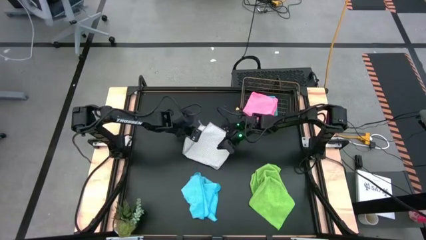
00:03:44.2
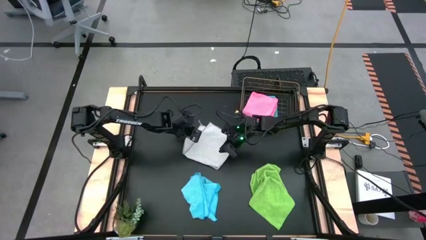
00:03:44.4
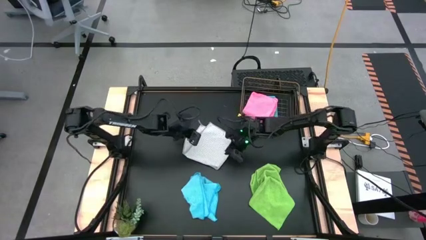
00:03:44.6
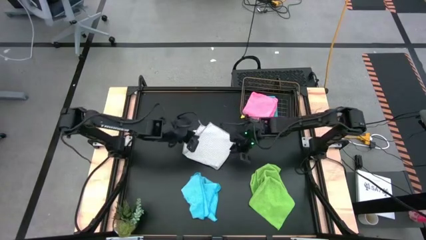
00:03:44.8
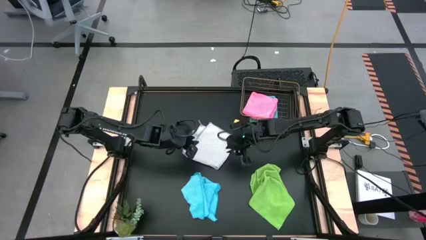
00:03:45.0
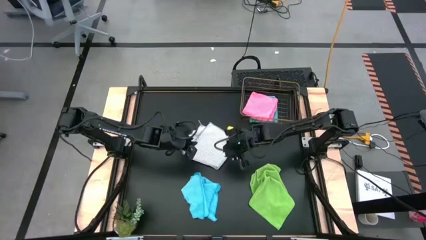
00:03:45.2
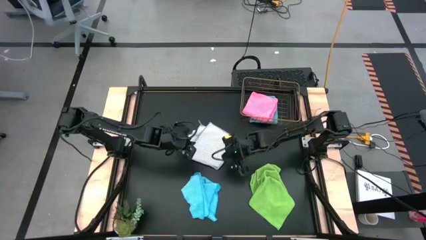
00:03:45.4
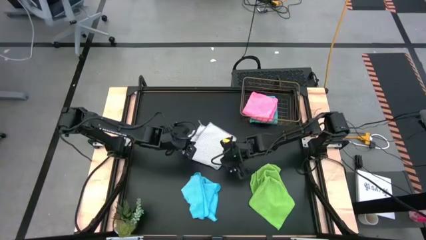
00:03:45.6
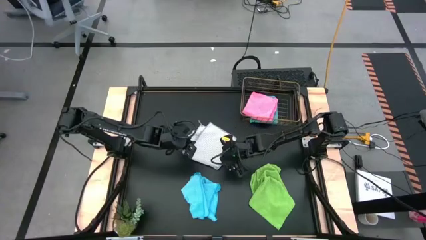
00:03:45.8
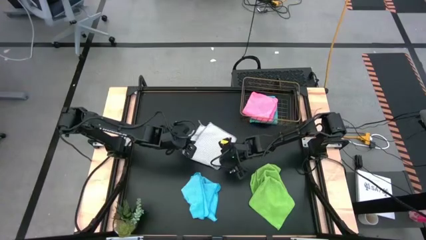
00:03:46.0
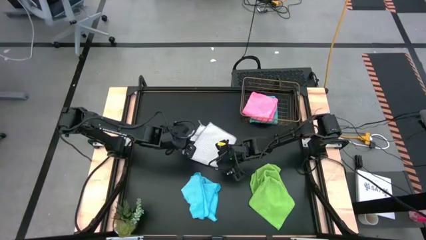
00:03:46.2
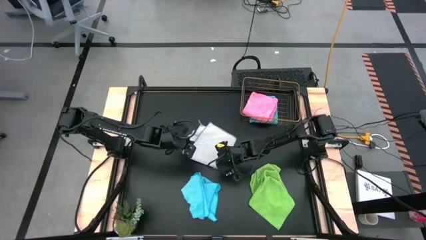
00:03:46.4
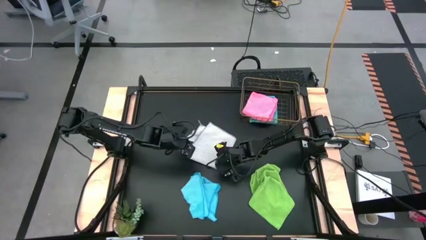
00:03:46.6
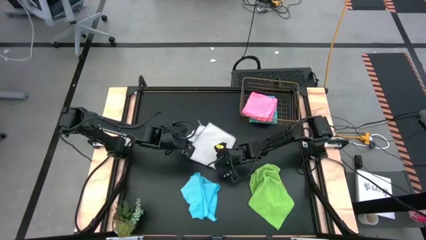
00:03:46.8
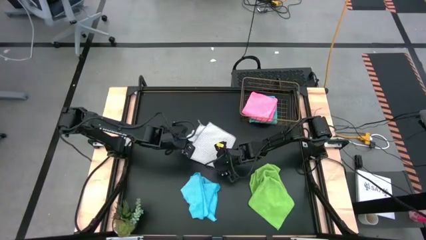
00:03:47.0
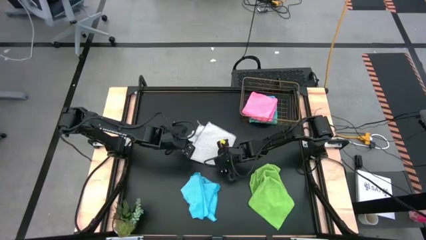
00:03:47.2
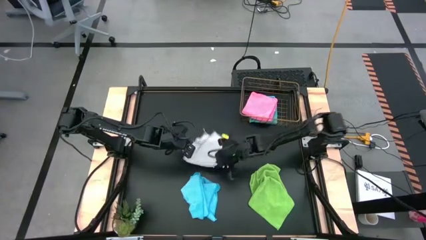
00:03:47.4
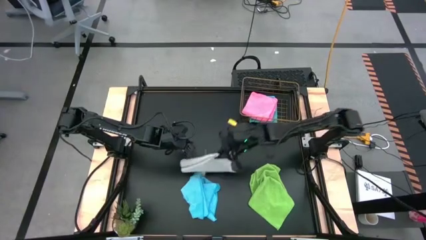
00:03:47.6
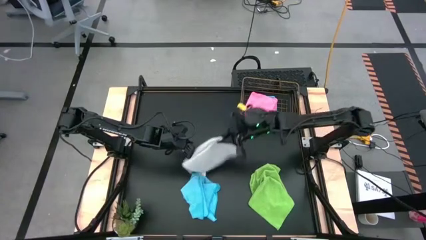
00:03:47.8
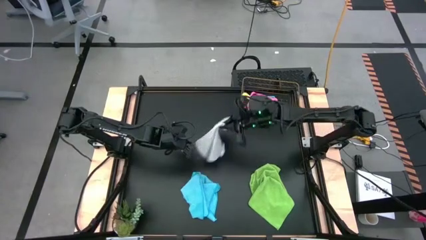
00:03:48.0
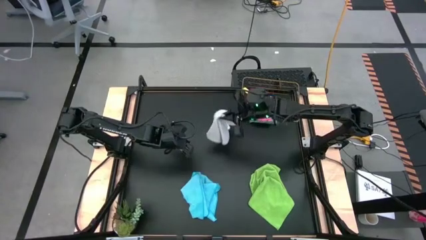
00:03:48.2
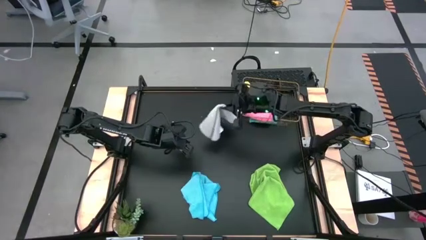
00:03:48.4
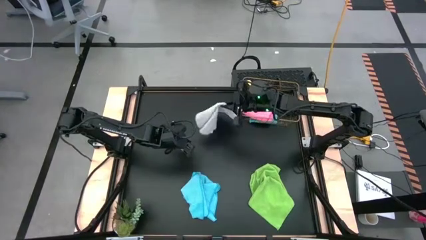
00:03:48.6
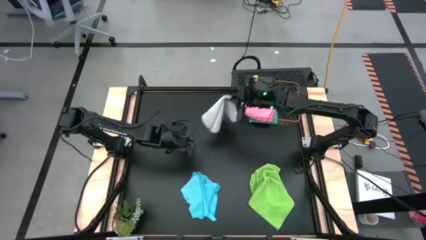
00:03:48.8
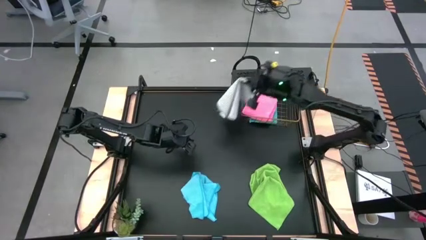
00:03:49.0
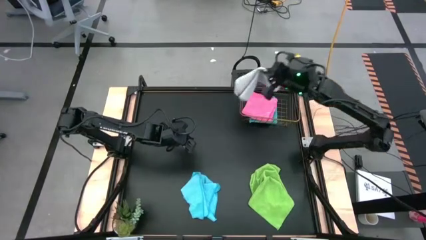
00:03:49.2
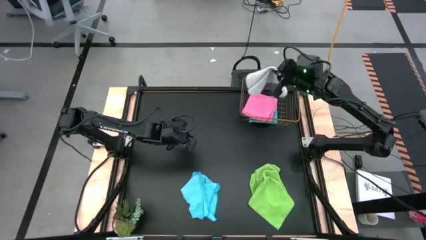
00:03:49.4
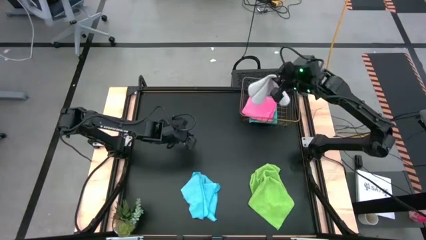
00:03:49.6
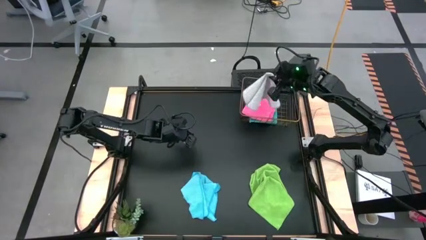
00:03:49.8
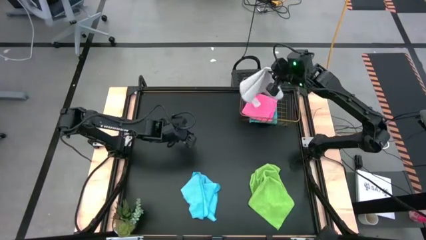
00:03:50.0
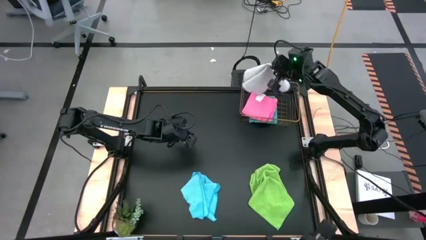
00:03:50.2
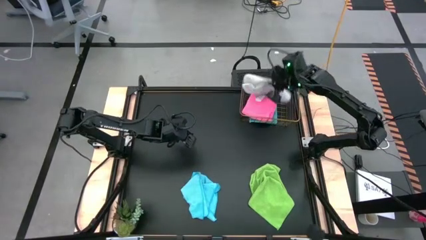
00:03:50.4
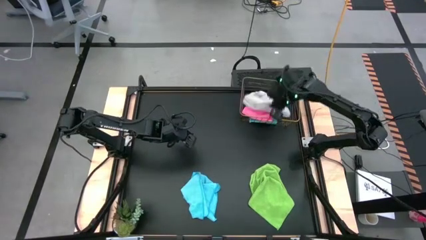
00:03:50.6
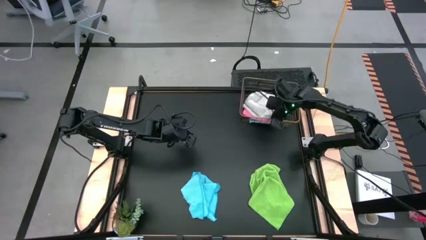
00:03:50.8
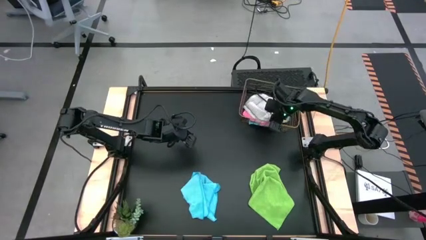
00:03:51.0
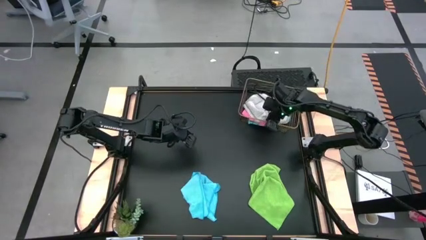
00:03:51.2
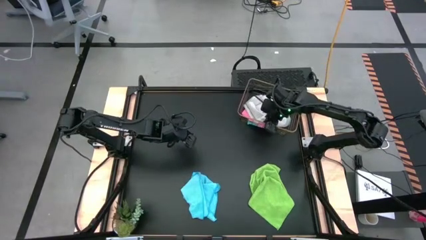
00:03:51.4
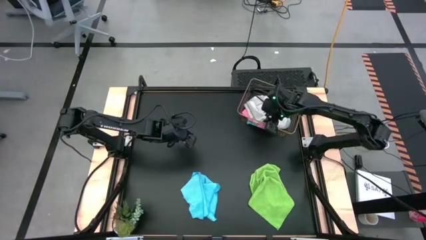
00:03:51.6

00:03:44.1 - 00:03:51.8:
Task: Fold microfiber towels
Put the folded gray towel into the gold wire basket

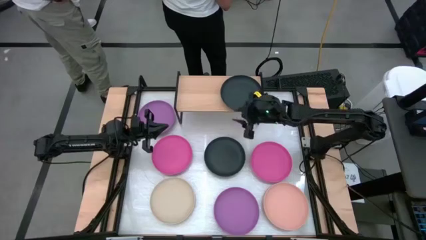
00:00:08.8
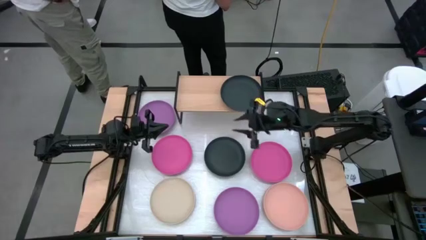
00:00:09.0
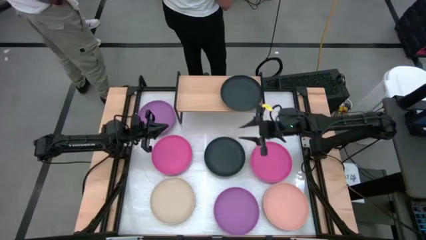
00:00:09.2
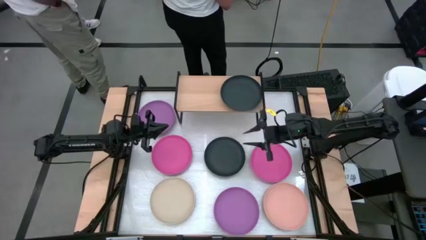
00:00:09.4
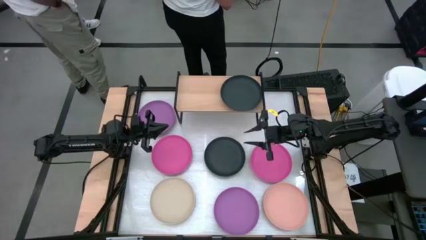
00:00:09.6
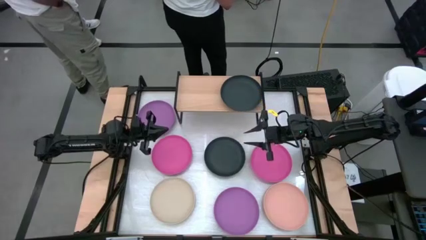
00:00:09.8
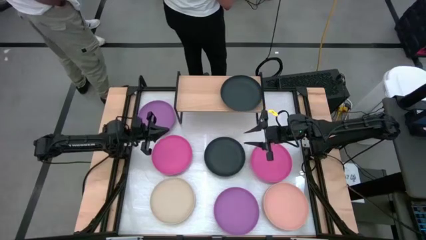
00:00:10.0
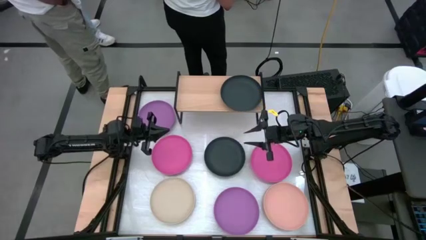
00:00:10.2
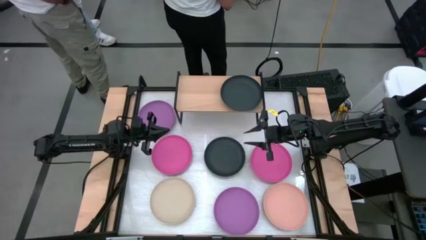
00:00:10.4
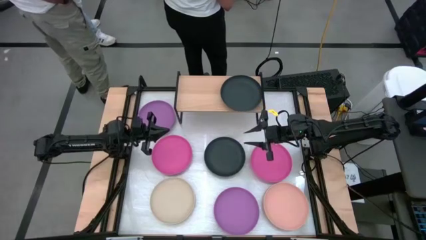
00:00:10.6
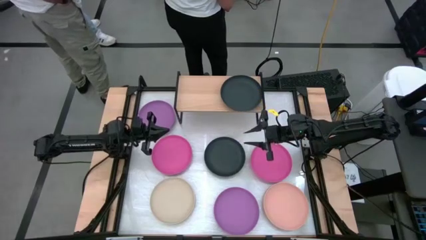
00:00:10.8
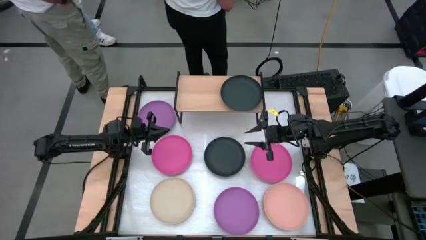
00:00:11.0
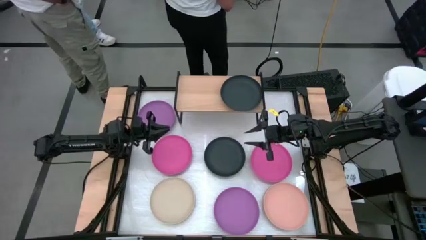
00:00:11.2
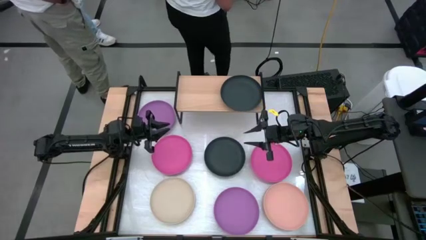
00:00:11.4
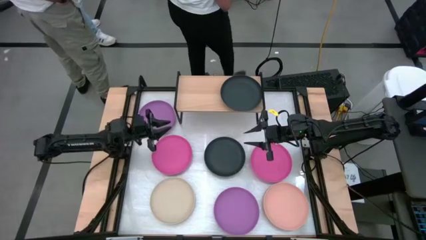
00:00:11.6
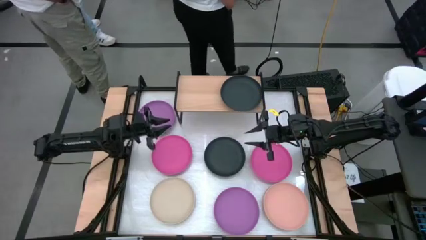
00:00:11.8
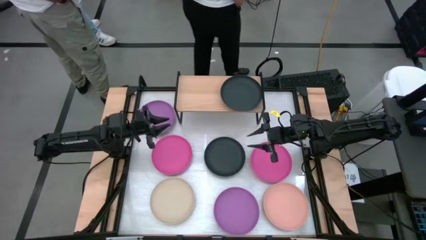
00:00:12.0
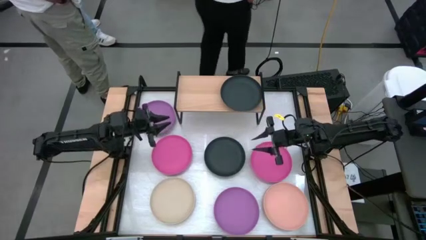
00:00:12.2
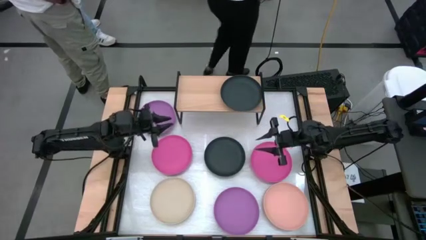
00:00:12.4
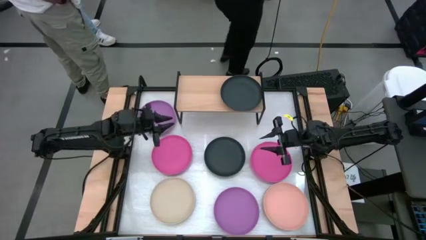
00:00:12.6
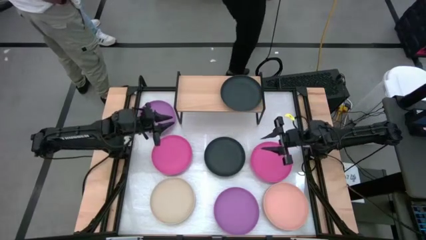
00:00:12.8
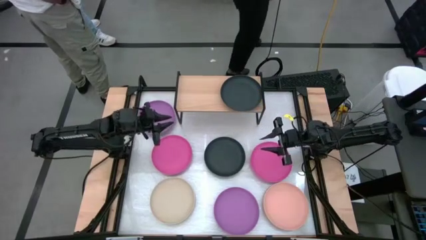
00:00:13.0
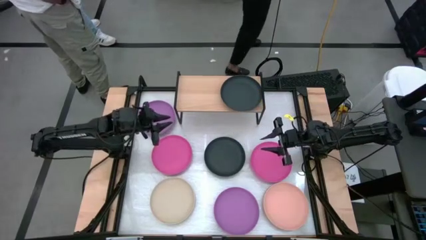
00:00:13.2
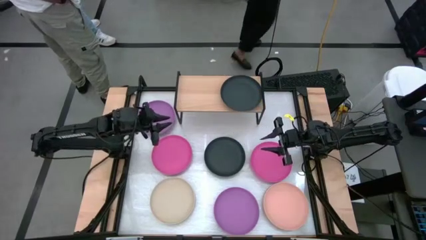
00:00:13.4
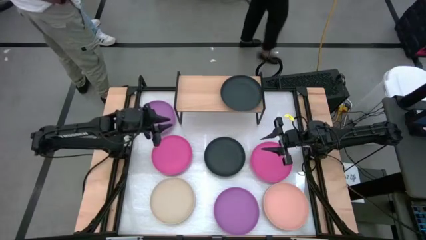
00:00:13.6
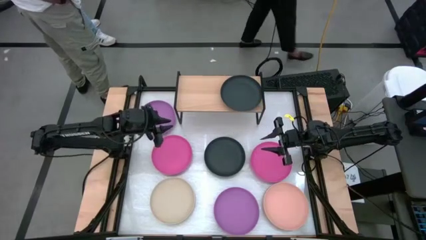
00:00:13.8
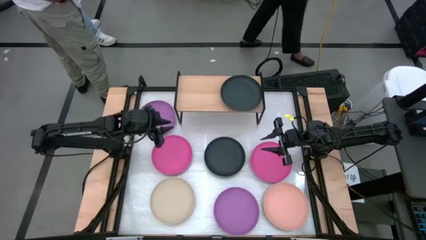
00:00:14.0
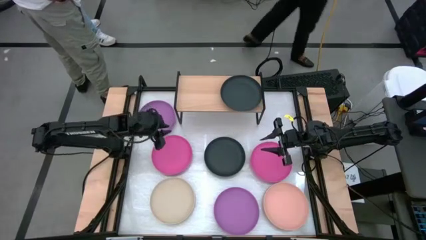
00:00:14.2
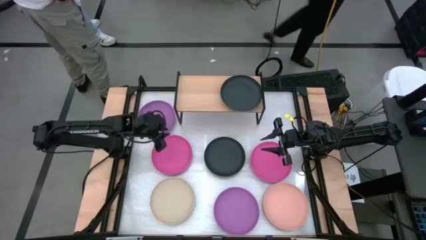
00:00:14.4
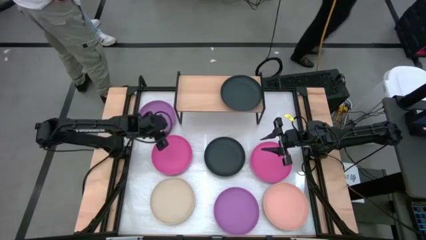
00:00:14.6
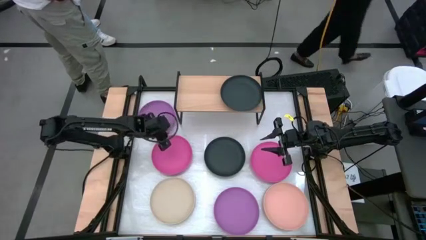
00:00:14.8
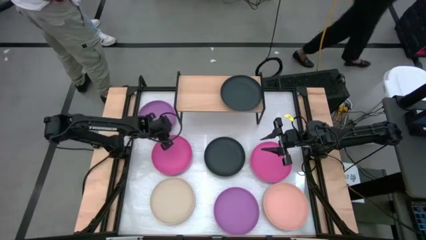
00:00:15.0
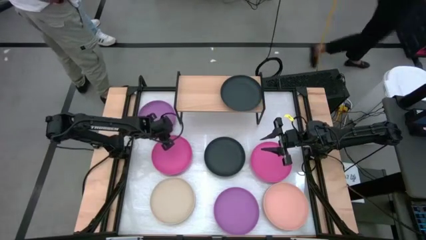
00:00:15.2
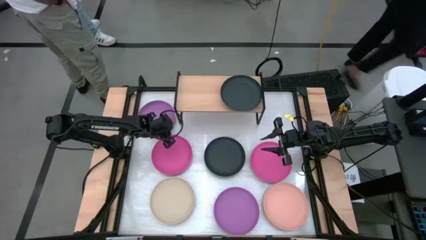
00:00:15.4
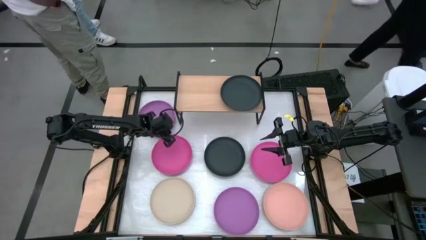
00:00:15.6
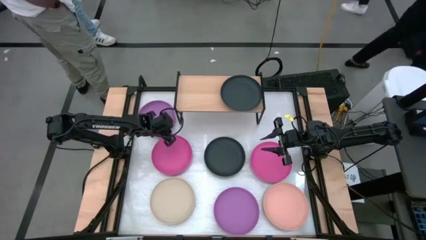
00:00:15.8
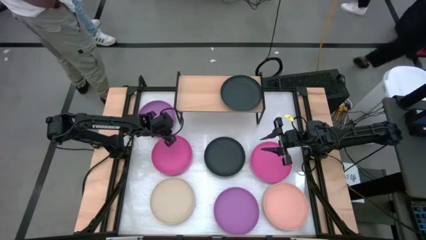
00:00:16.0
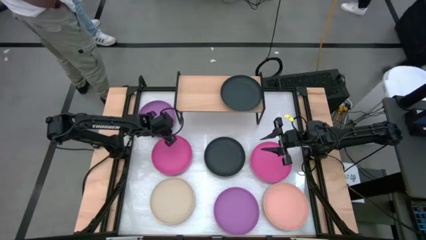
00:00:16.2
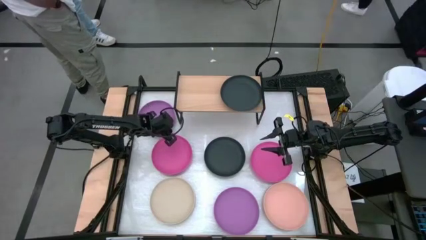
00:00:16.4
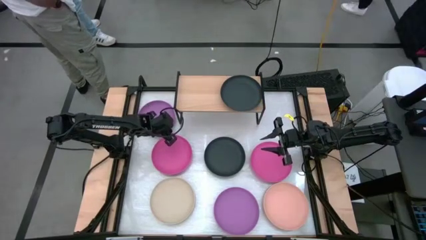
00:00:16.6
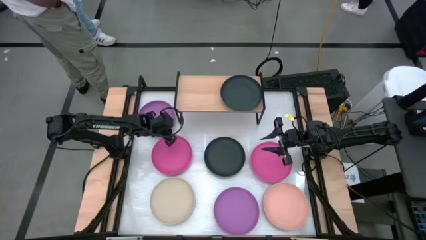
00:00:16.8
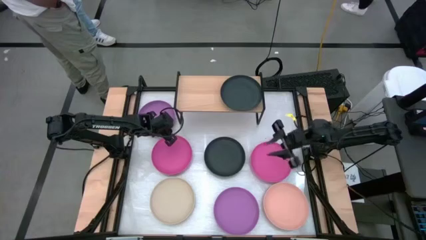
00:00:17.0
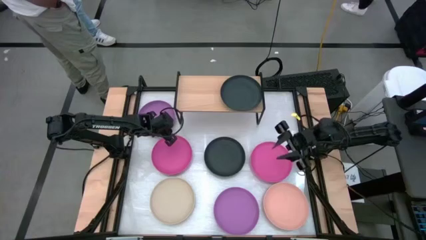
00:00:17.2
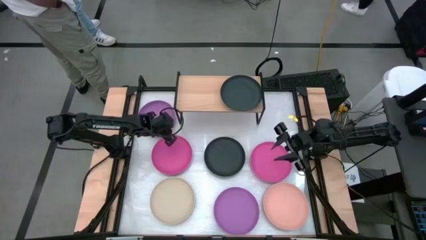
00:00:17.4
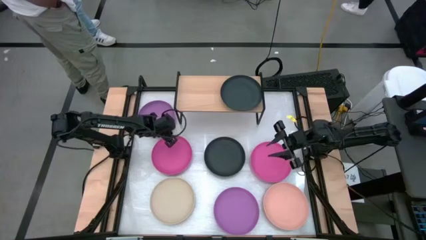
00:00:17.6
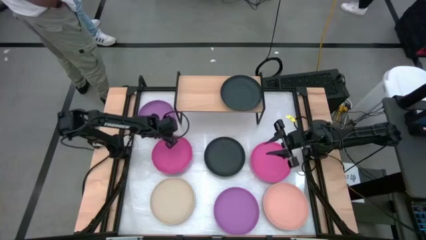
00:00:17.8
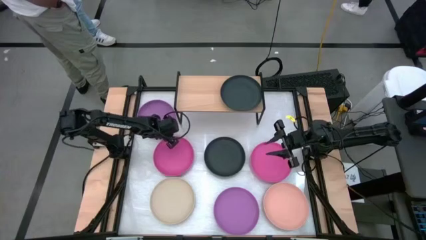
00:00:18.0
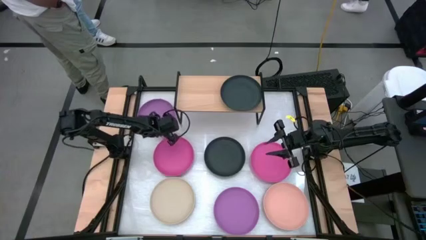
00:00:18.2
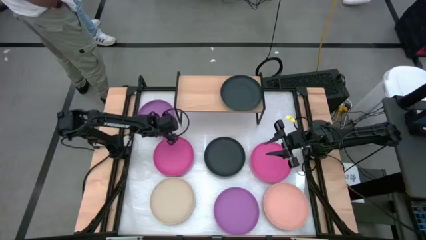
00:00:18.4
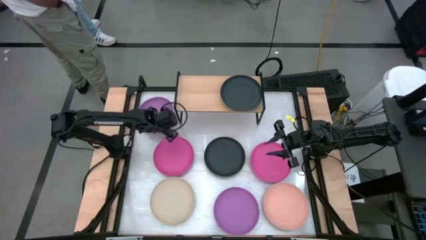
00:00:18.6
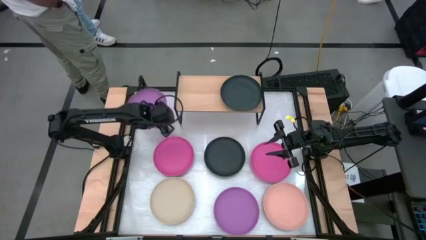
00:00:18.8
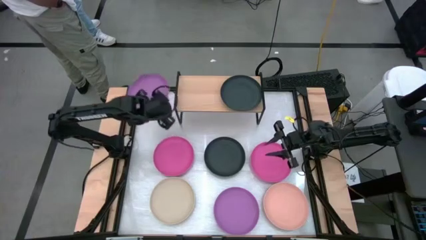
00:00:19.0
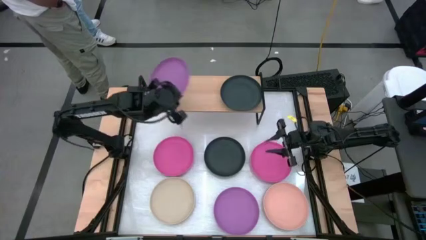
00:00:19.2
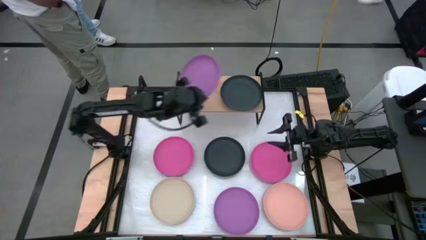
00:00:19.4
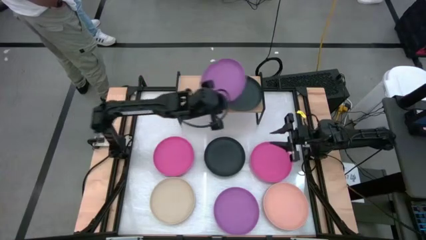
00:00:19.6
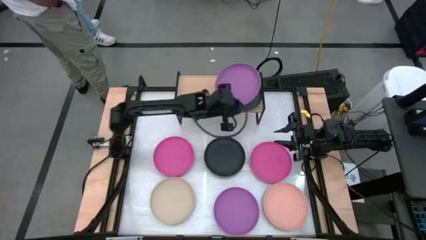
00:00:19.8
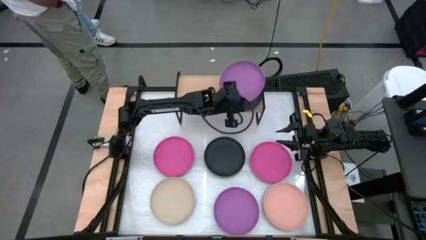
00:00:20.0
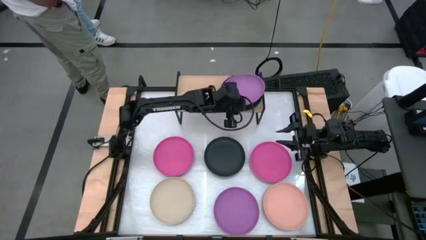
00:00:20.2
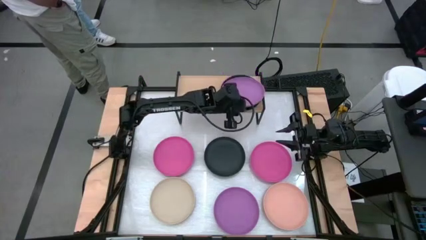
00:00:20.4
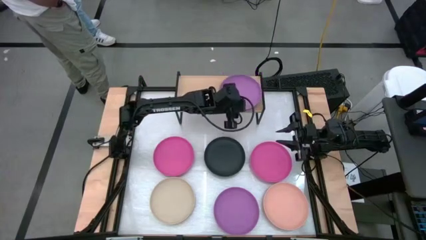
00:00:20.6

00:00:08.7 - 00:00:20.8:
Task: Place and stack plates onto a shelf
Stack the top purple plate on top of the black plate on the shelf
